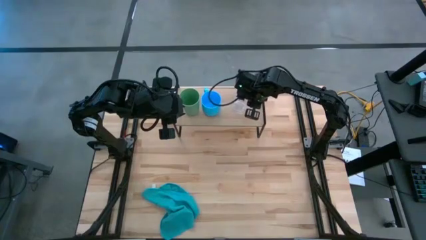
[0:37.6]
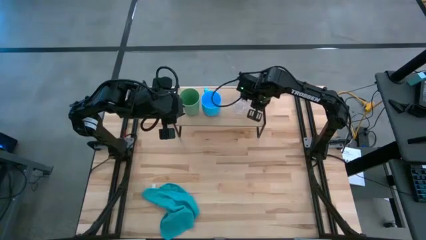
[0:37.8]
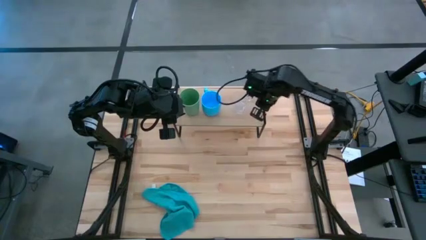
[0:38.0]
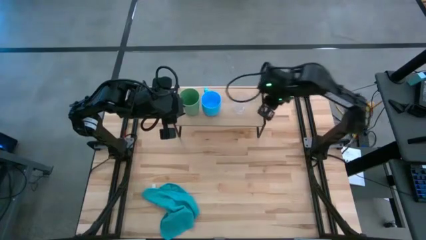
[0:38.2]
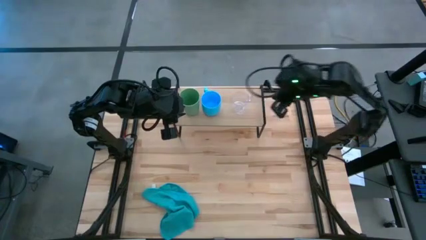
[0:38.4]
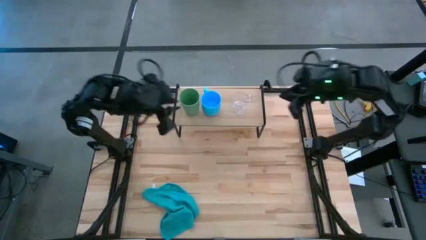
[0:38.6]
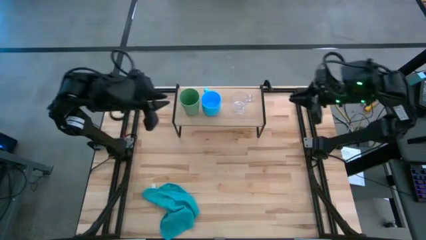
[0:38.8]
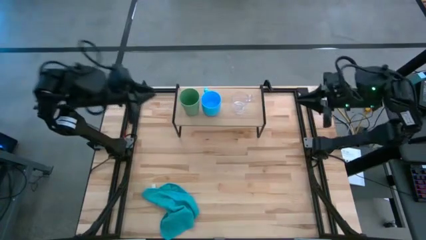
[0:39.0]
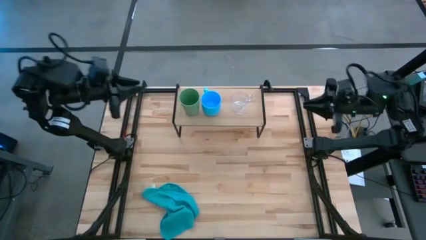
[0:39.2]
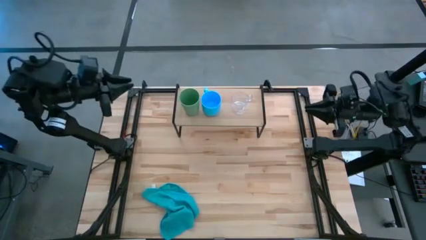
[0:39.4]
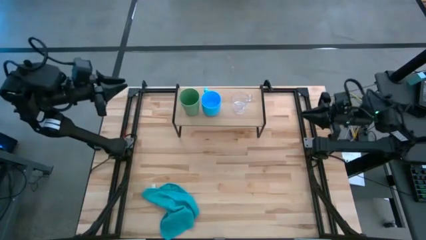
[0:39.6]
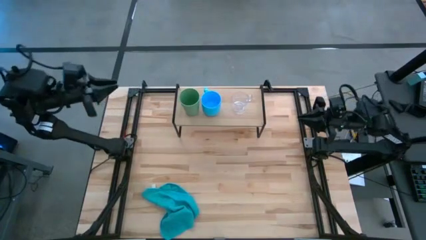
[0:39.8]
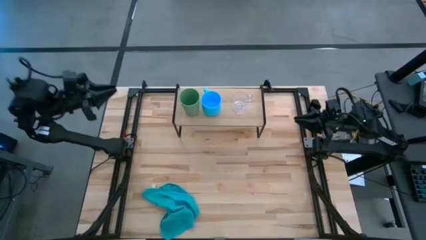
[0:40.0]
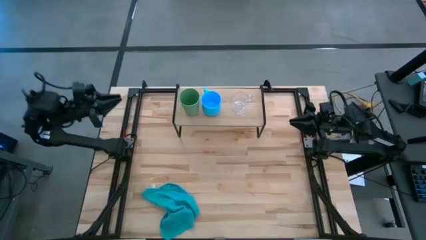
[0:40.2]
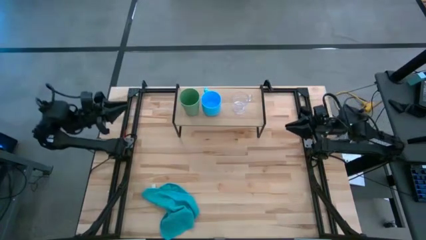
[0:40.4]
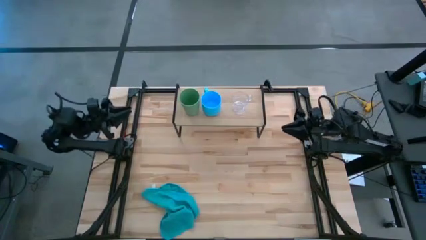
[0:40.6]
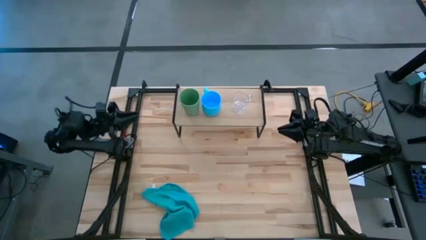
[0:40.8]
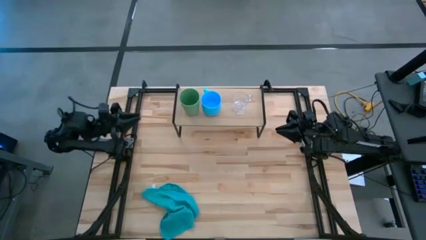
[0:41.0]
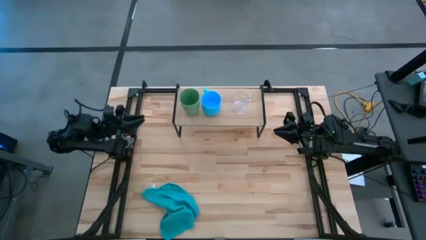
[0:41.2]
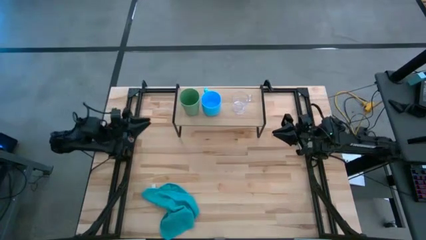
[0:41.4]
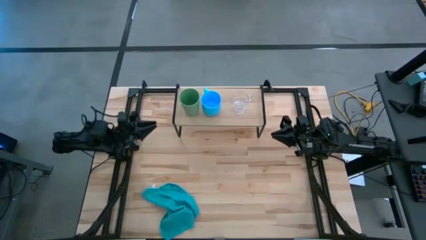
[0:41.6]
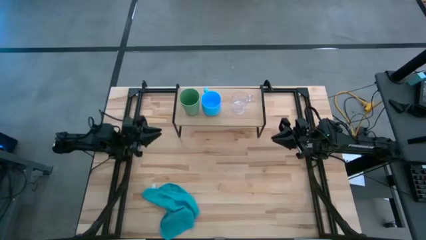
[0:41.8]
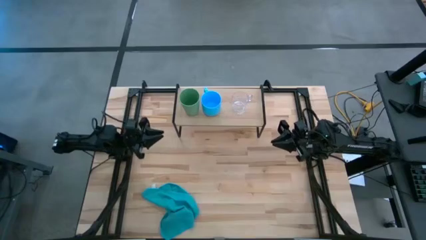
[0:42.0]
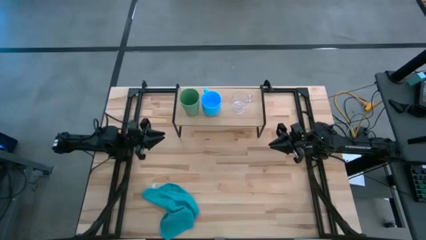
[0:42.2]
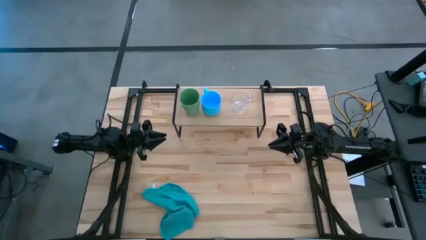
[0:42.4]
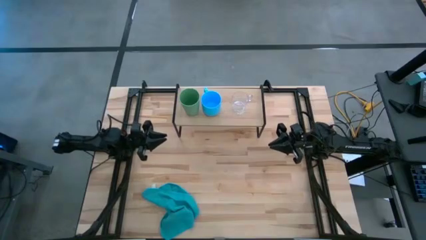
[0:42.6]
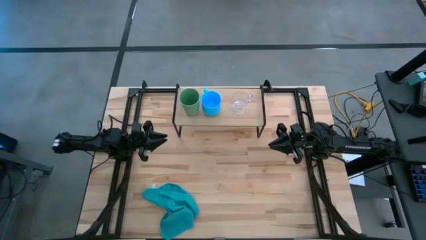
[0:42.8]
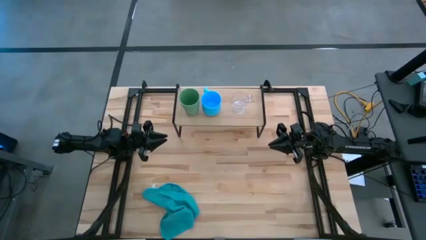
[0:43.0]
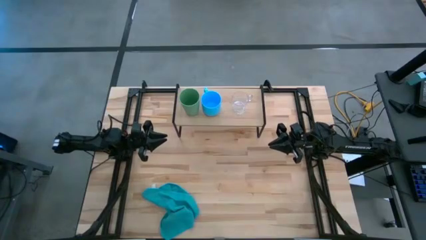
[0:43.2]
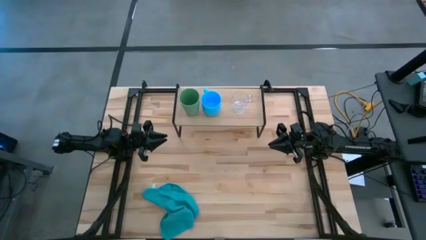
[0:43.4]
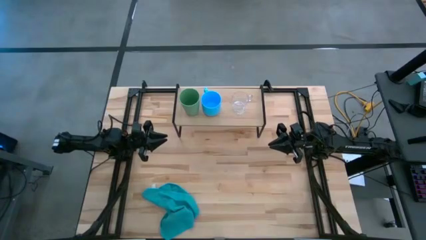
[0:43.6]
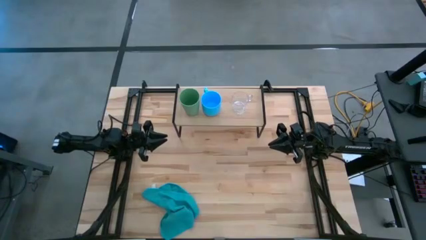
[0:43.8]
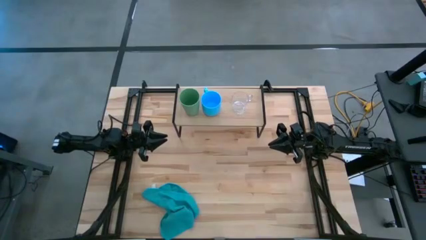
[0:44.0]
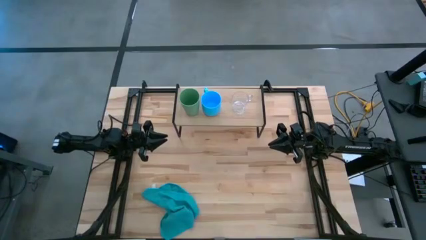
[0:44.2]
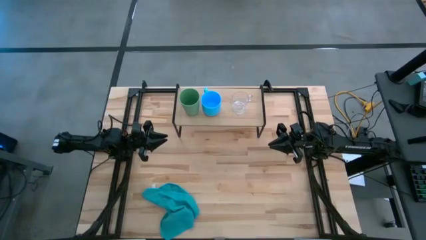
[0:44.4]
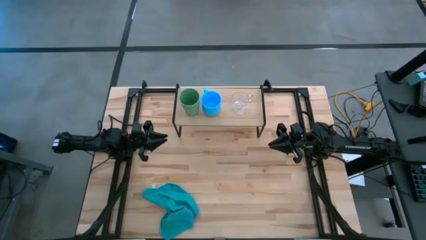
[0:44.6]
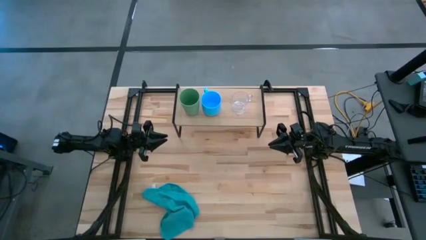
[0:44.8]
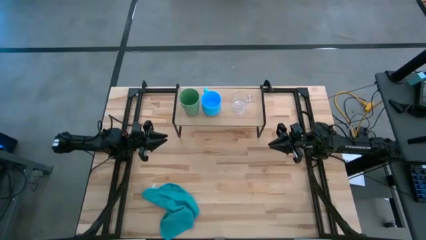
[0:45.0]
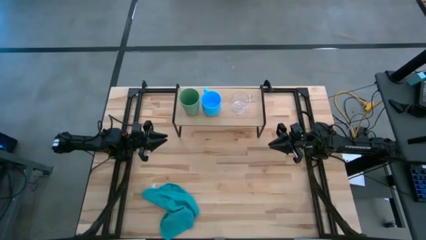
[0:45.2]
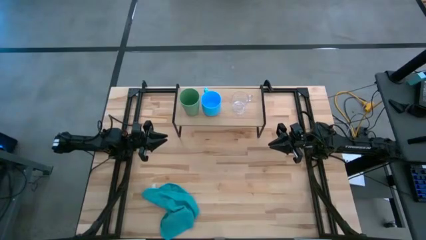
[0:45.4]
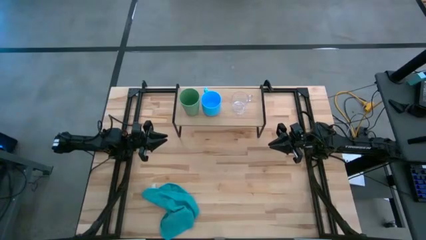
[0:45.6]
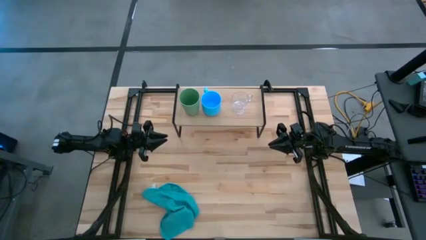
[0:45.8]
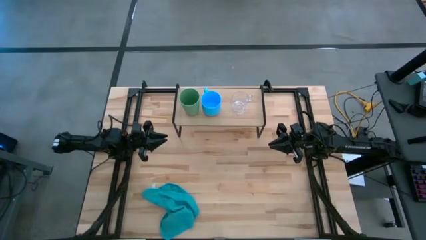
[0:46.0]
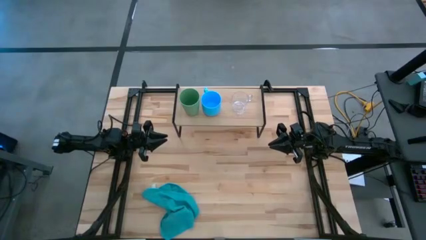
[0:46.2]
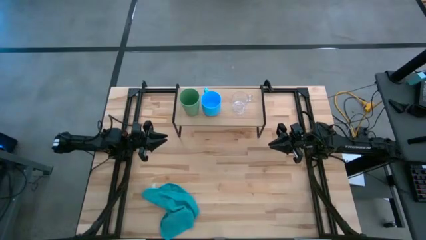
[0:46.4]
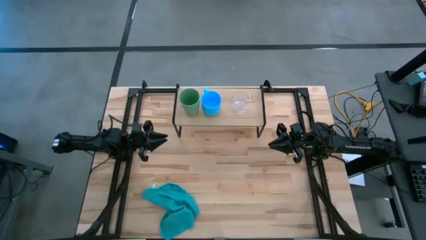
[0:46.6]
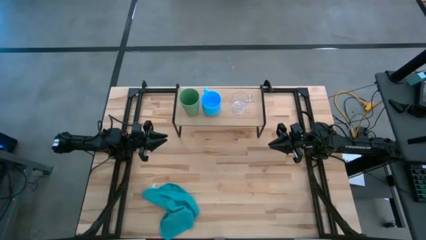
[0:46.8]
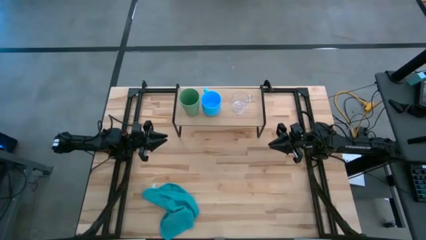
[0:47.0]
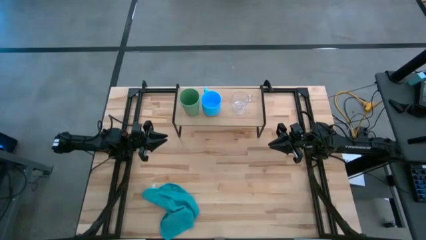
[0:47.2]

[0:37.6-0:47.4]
Task: Stack small to large cups/mugs on shelf
Return to Home Position

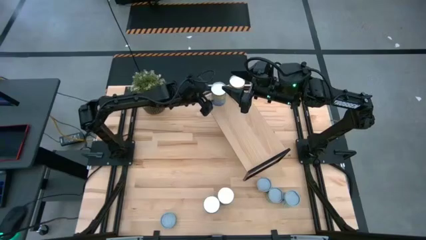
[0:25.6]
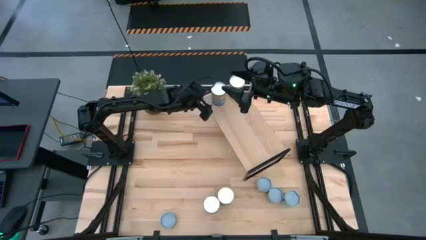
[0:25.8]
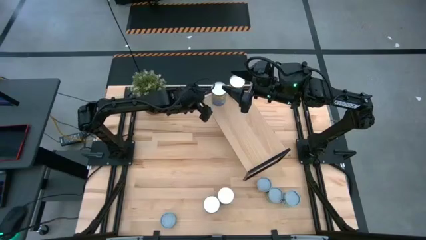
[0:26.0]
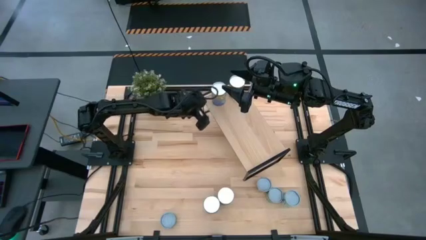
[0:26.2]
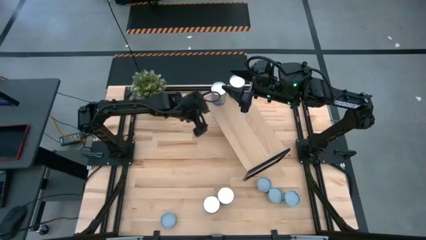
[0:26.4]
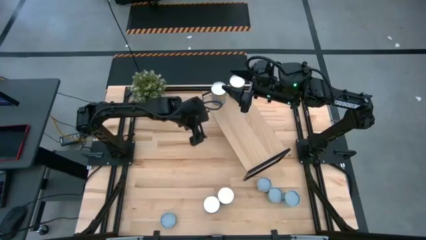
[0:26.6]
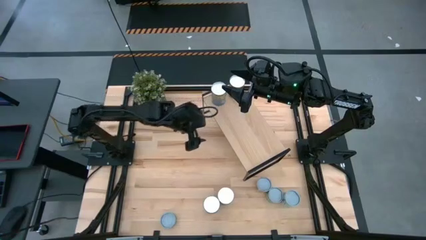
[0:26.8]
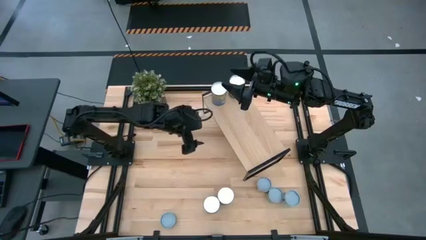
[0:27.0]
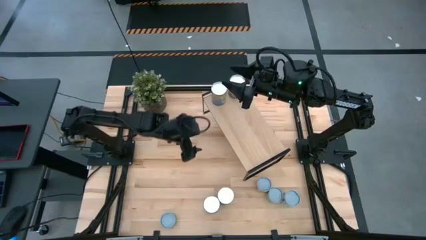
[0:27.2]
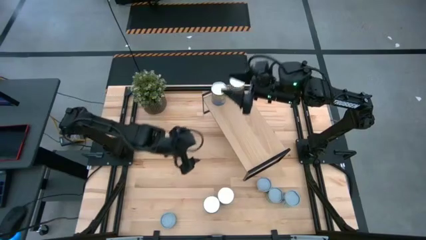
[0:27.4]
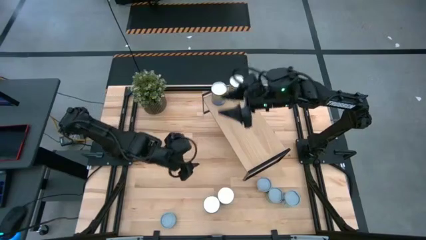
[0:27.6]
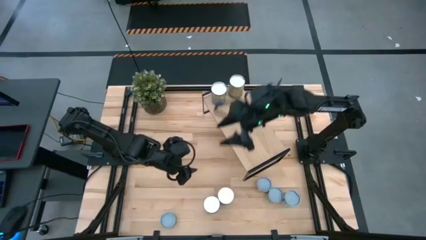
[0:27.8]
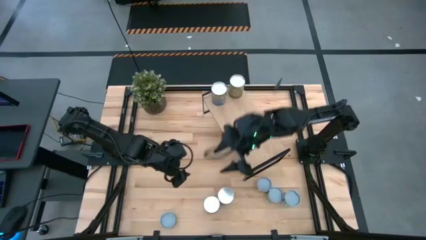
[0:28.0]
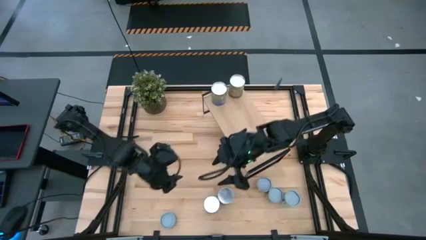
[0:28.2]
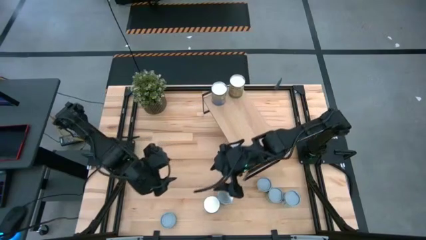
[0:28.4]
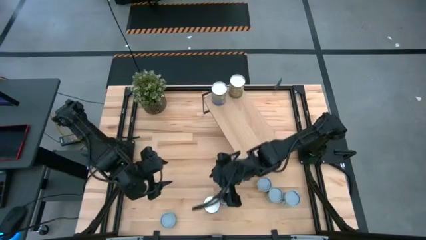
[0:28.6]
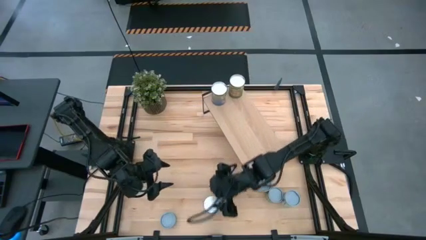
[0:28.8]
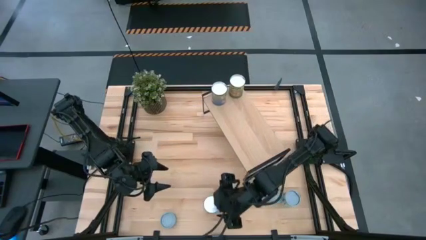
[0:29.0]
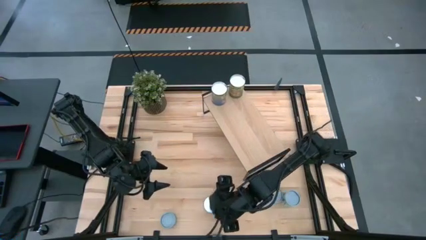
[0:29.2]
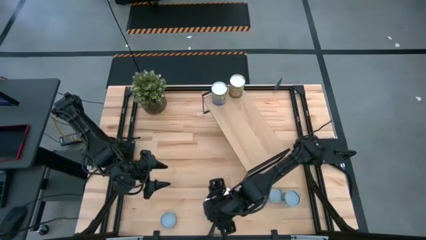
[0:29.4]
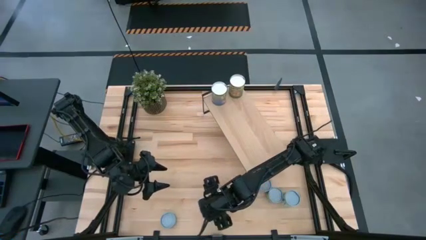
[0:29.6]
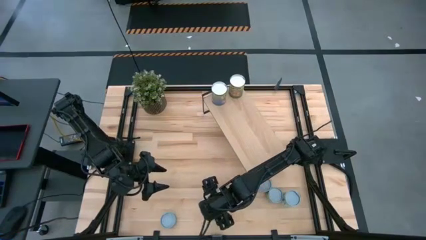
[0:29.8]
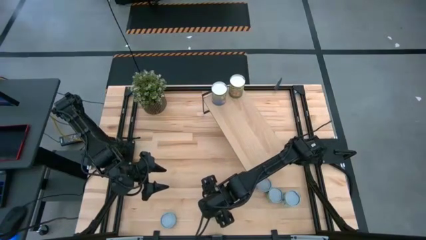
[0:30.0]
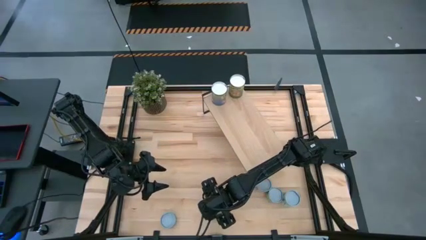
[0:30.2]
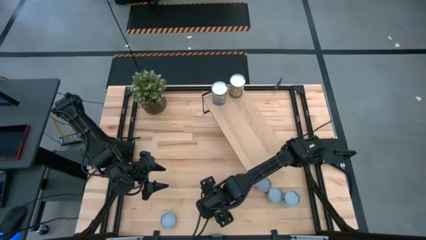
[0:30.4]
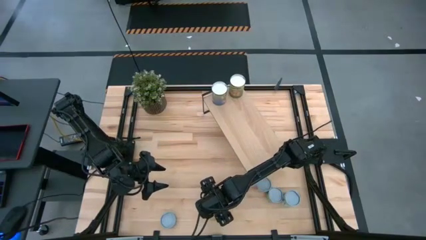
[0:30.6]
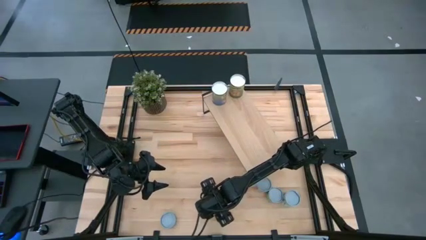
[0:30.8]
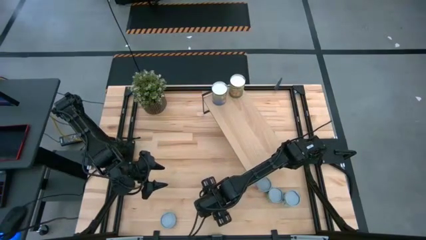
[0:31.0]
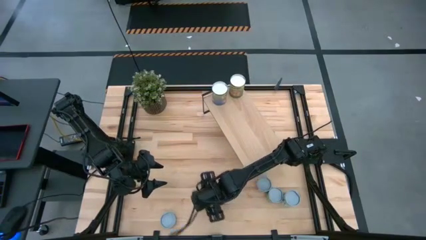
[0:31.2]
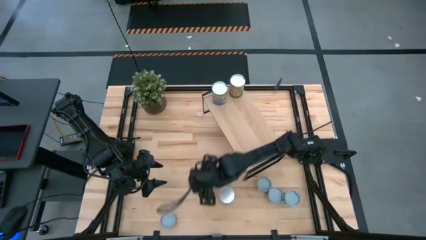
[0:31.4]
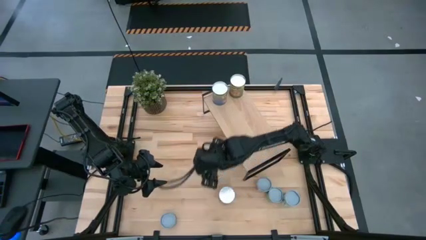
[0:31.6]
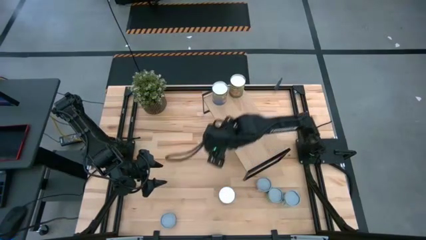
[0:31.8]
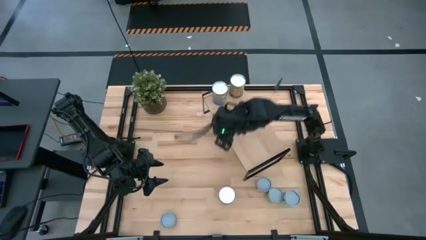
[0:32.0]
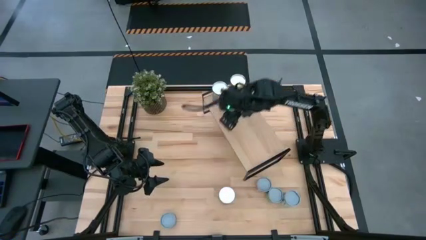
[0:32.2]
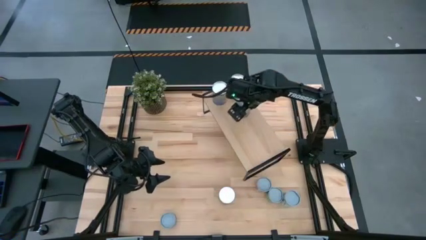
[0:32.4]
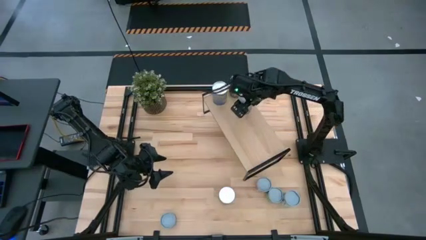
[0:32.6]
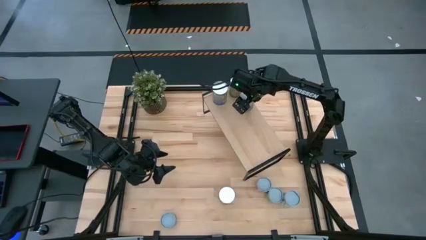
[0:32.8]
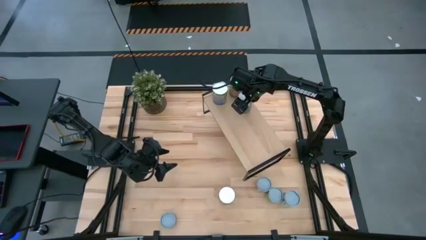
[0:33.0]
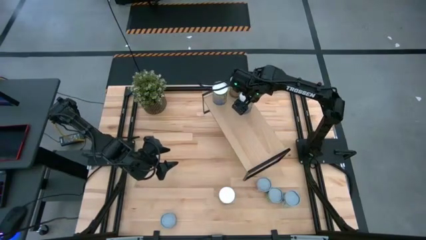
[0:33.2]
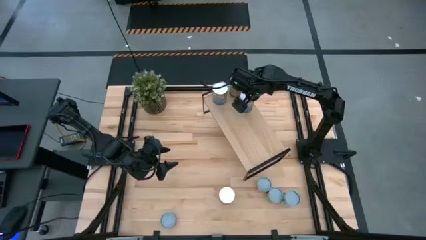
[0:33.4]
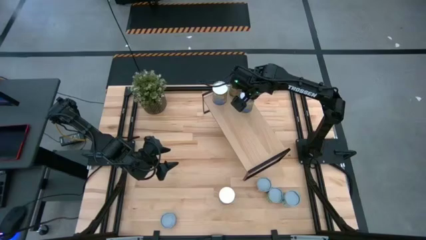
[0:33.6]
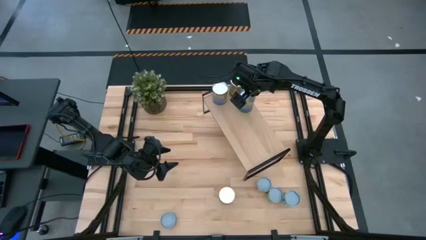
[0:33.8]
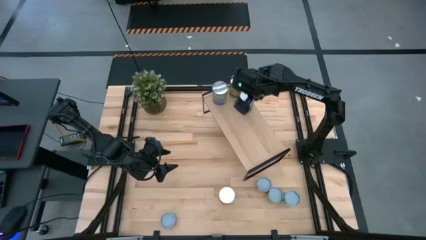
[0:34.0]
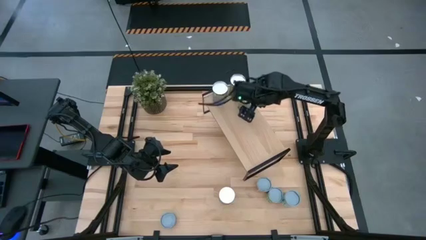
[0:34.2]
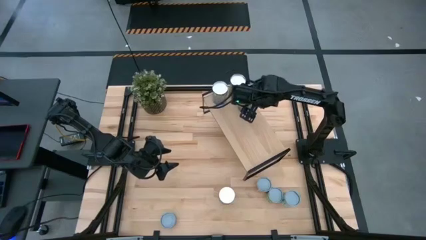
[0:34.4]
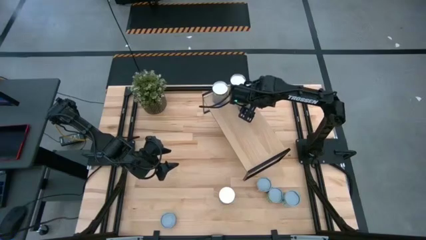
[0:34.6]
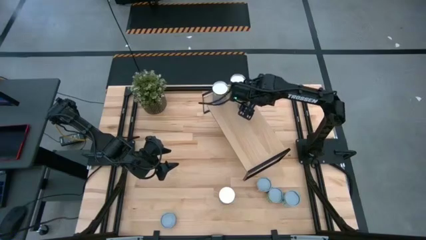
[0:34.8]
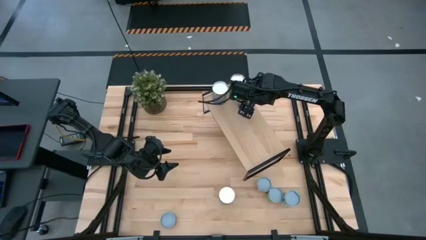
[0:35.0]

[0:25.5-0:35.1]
Task: Pick and place cans onto a shelf
Put the canned peas on the shelf
